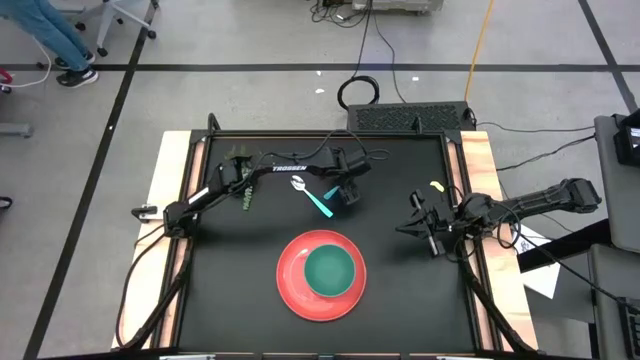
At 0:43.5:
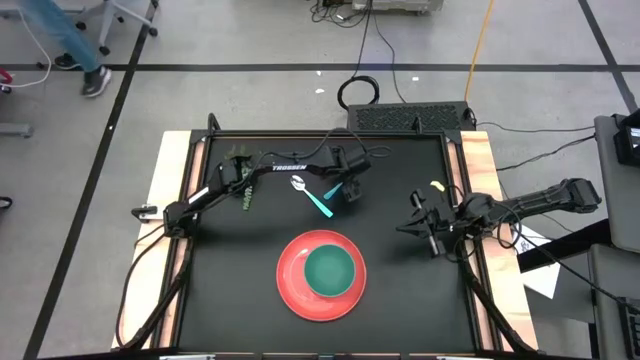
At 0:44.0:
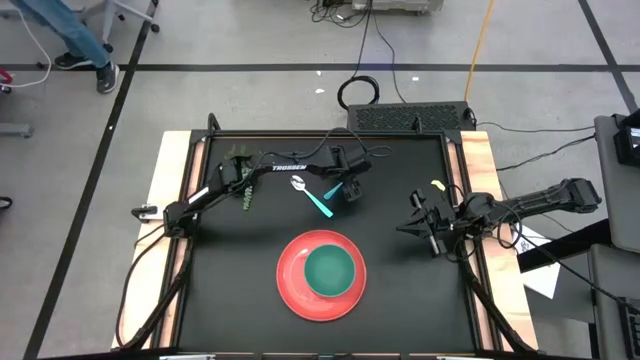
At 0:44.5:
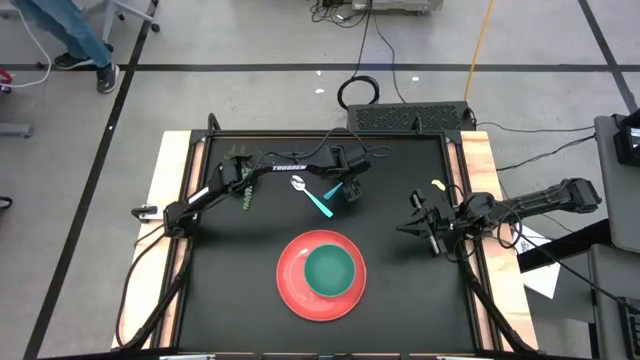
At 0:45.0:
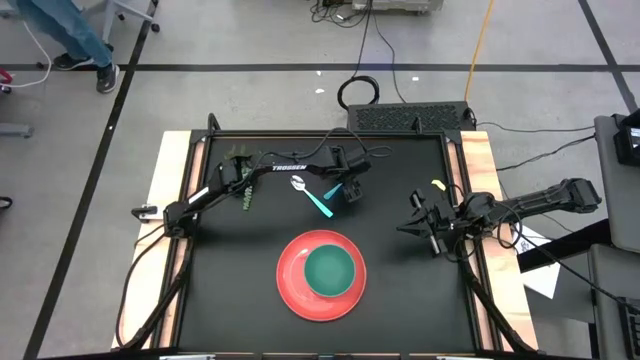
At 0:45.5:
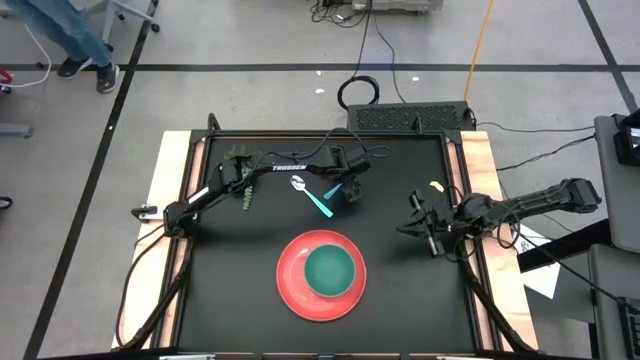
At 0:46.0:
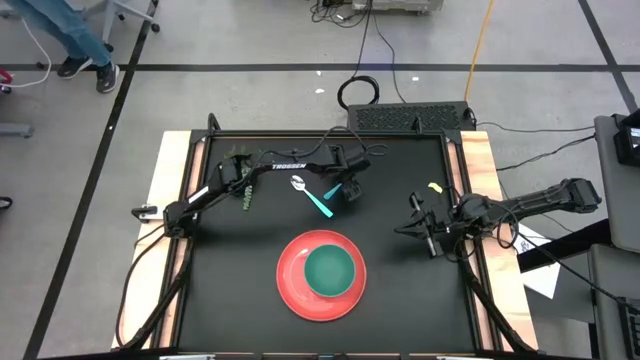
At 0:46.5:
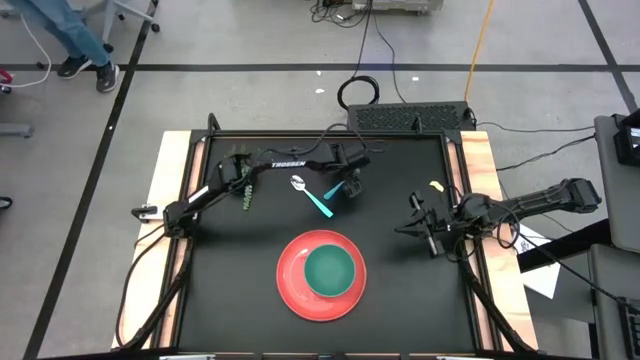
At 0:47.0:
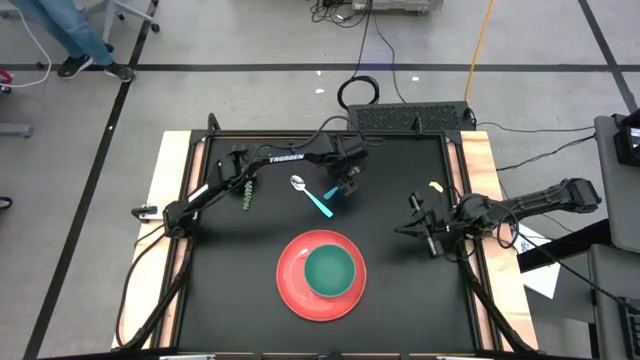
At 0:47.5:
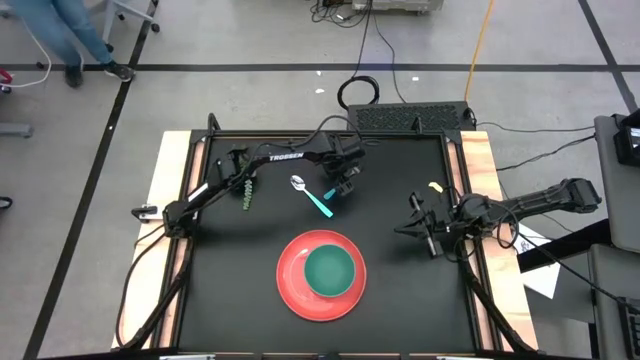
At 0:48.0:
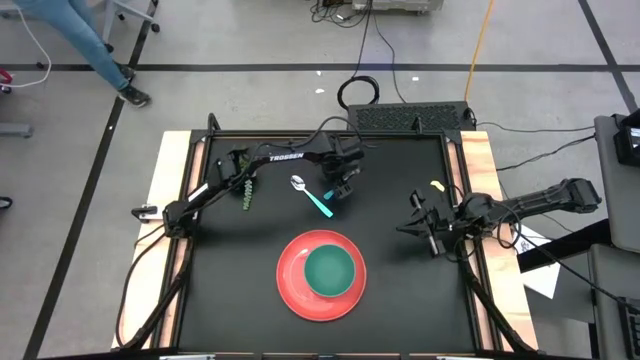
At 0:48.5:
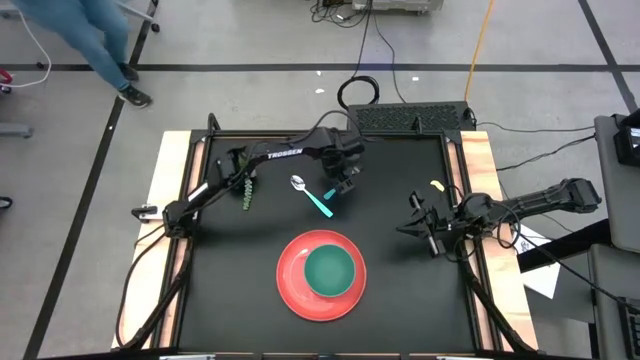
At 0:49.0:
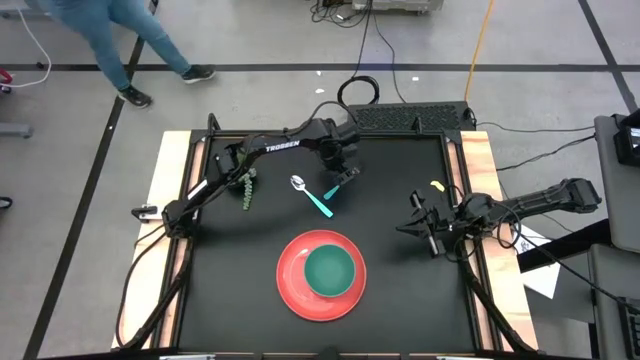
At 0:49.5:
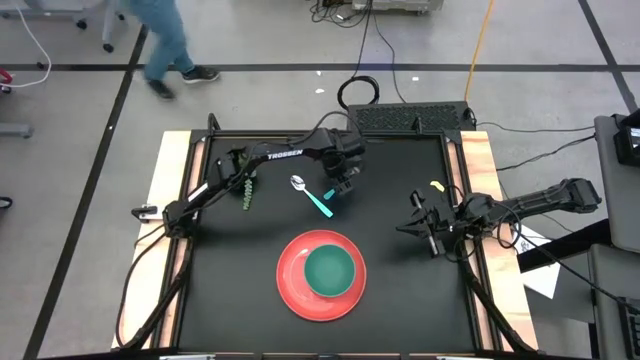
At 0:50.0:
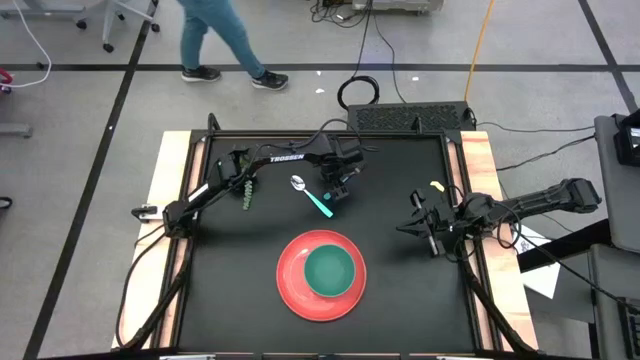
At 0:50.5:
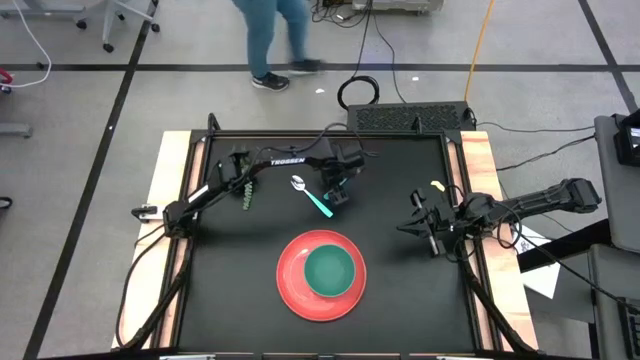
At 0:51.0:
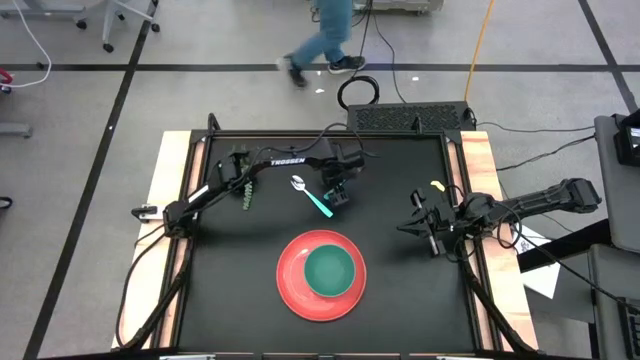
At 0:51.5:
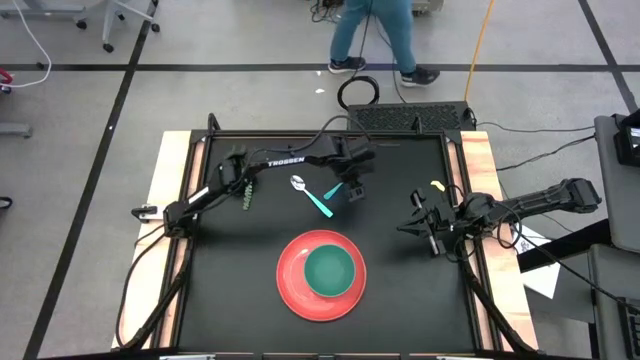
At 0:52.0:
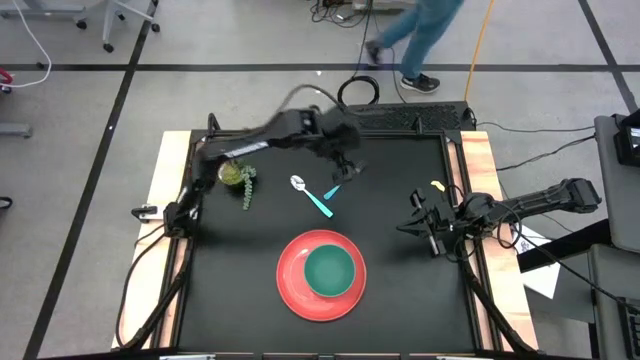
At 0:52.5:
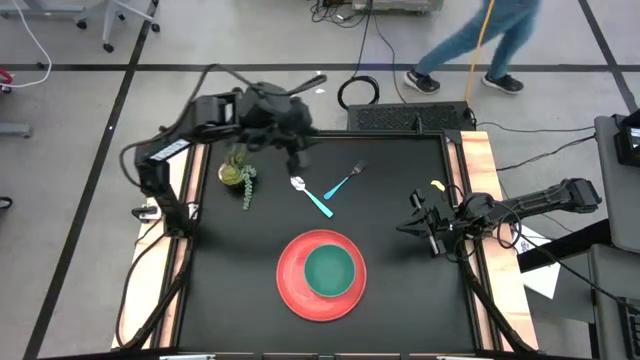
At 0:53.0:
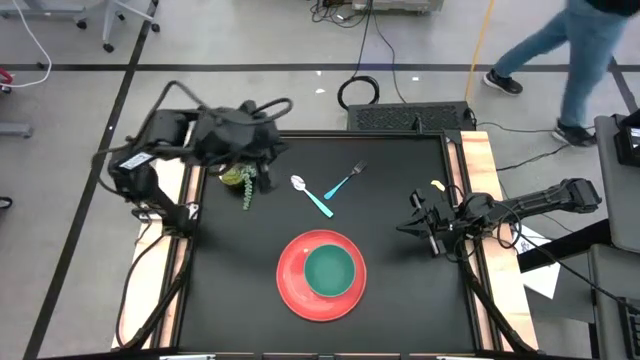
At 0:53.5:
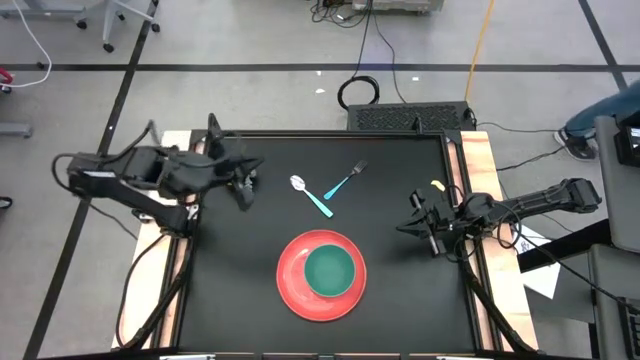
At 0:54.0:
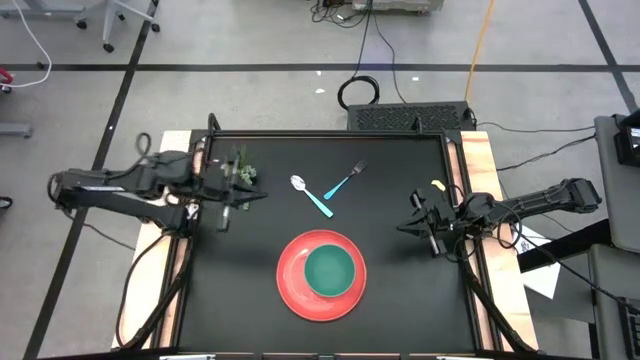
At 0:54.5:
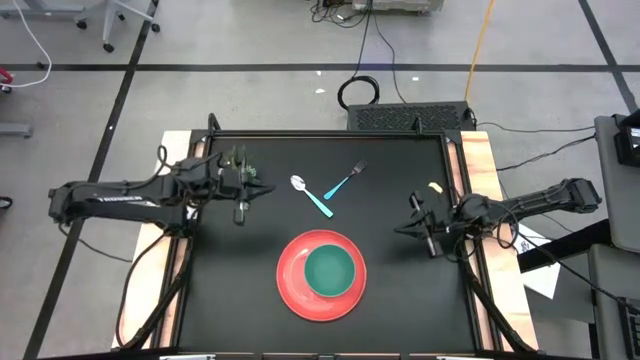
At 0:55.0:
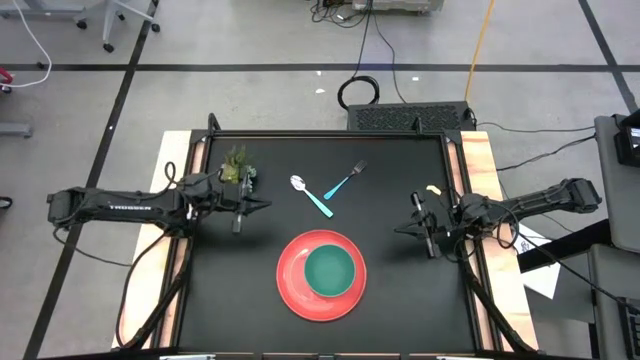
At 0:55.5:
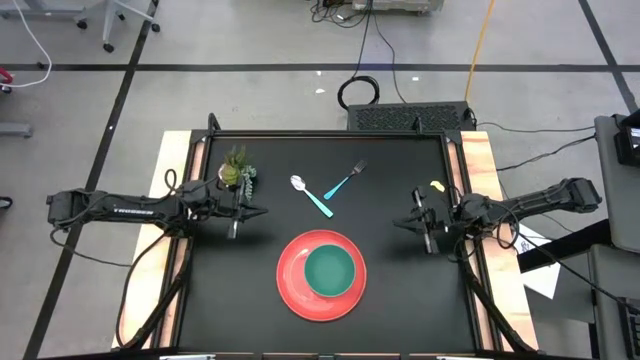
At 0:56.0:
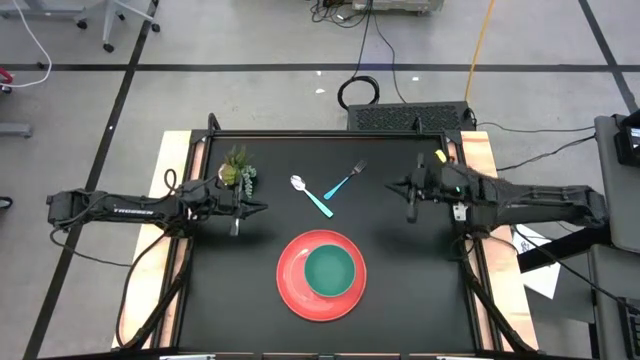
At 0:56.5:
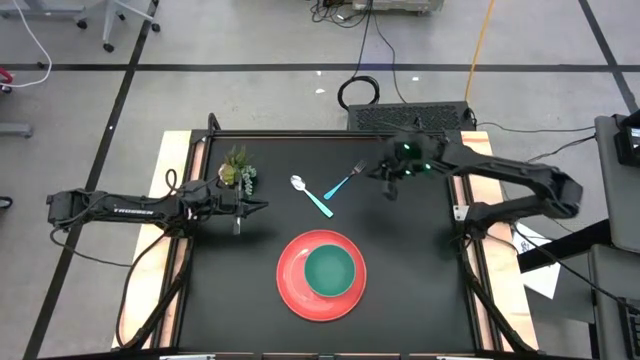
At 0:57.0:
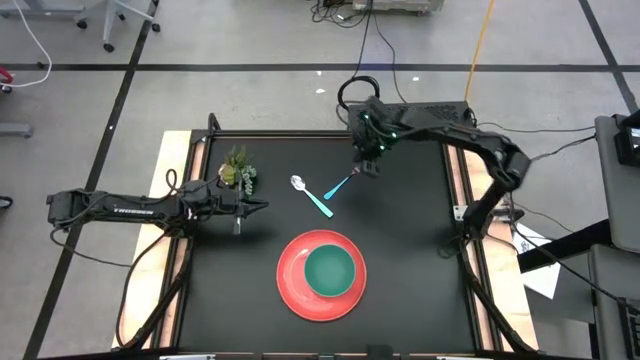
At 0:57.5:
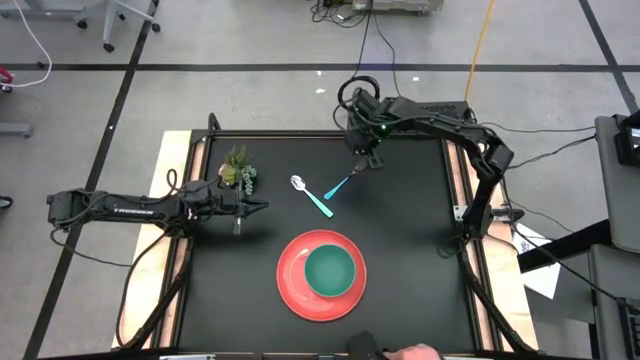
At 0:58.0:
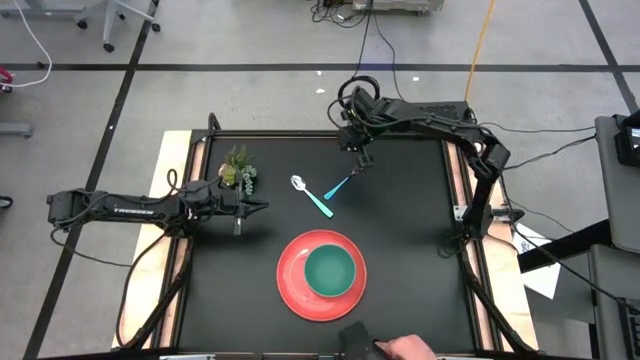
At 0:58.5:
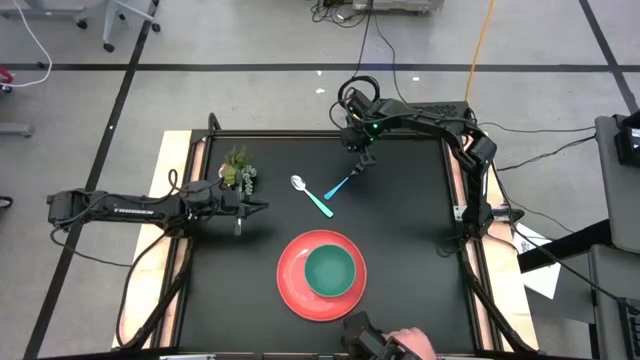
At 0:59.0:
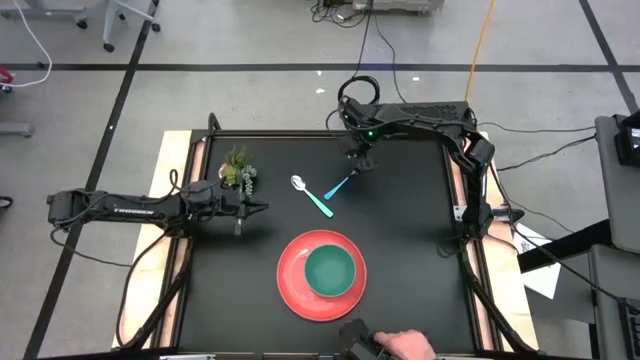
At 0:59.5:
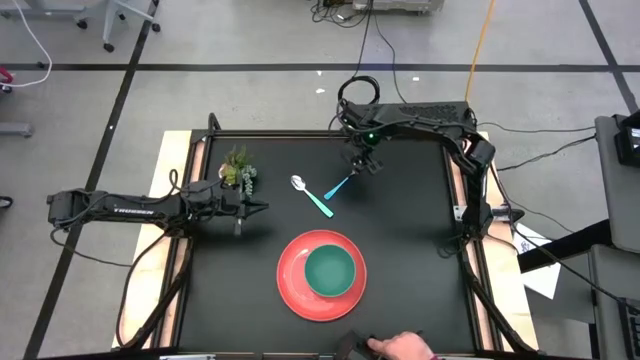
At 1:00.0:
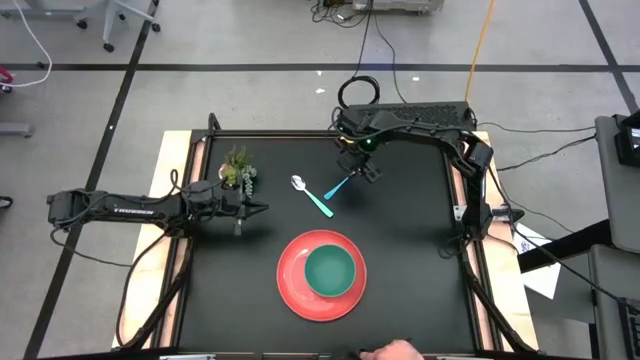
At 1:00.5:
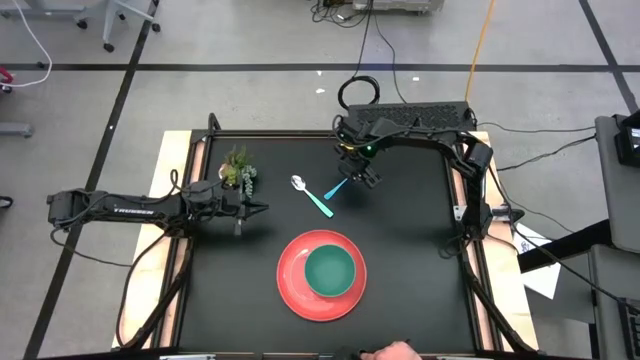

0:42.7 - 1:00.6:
Task: Set table place
Put the blue fork on the orange plate to the left of the green bowl

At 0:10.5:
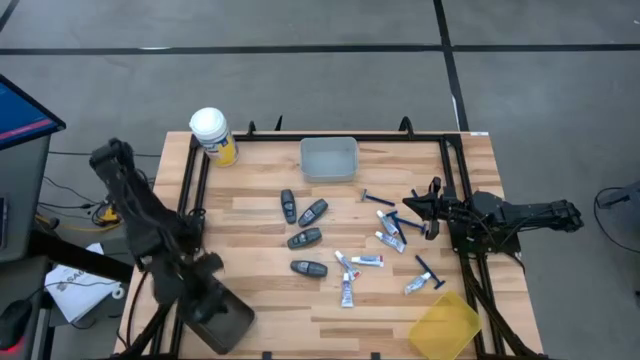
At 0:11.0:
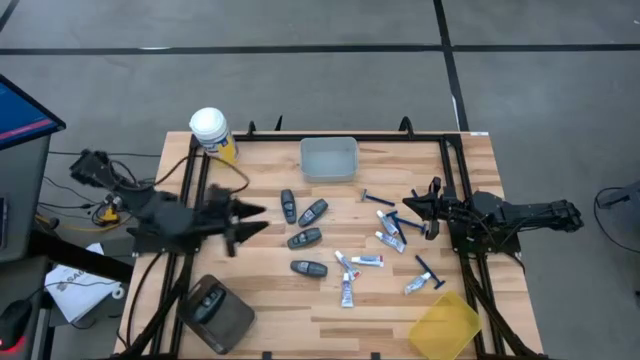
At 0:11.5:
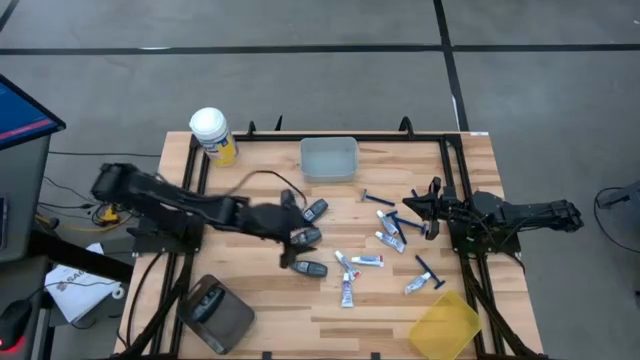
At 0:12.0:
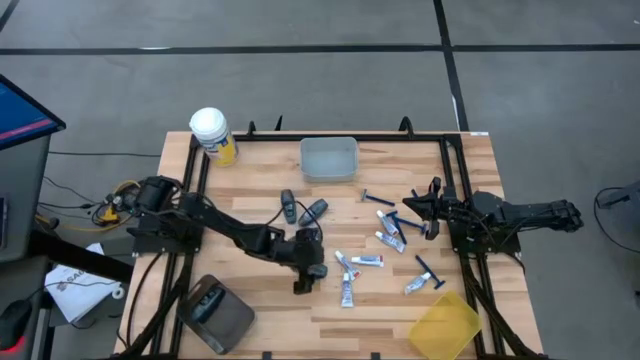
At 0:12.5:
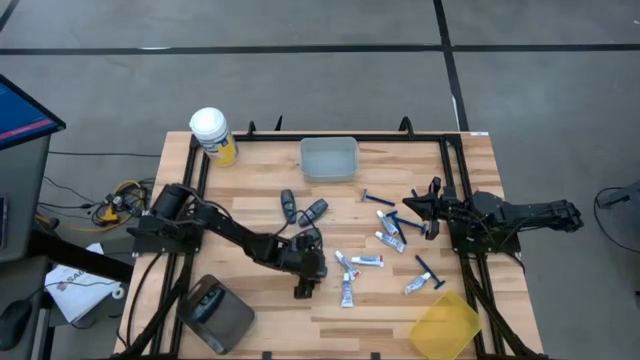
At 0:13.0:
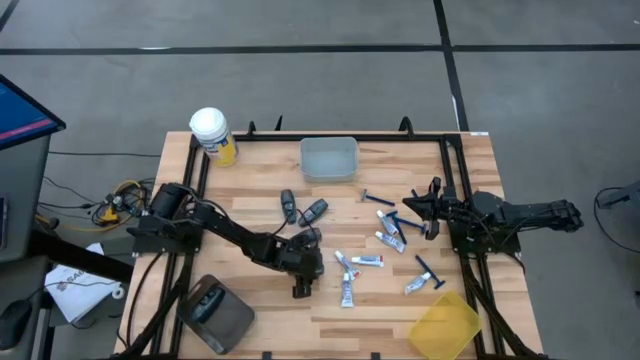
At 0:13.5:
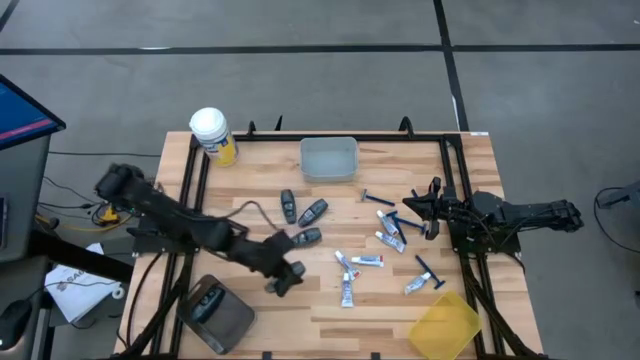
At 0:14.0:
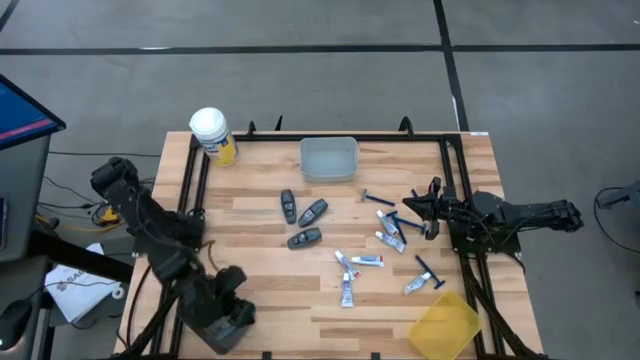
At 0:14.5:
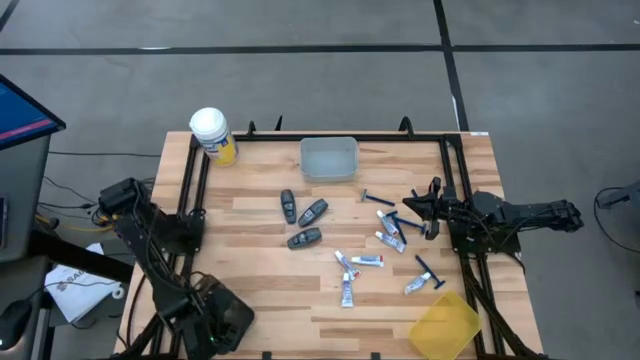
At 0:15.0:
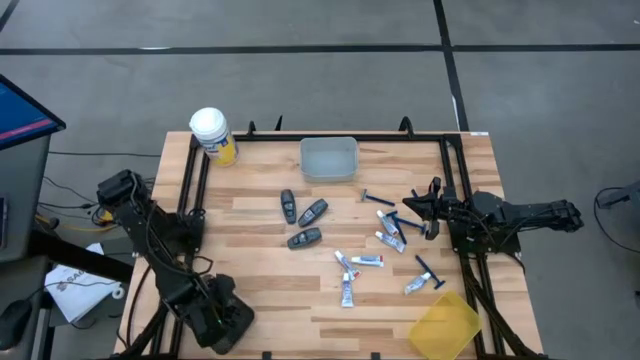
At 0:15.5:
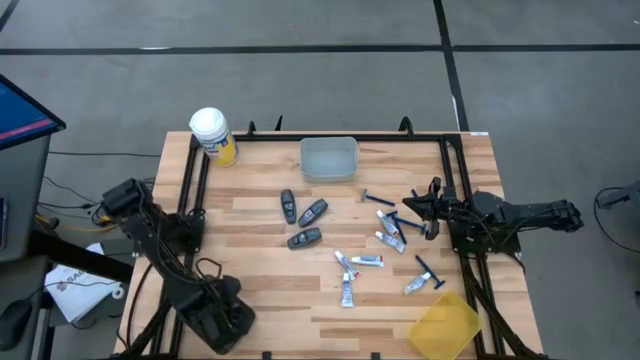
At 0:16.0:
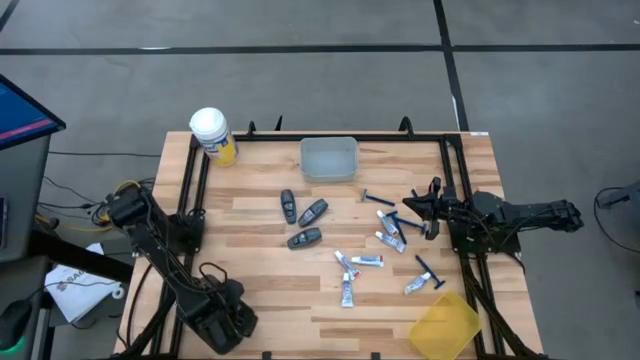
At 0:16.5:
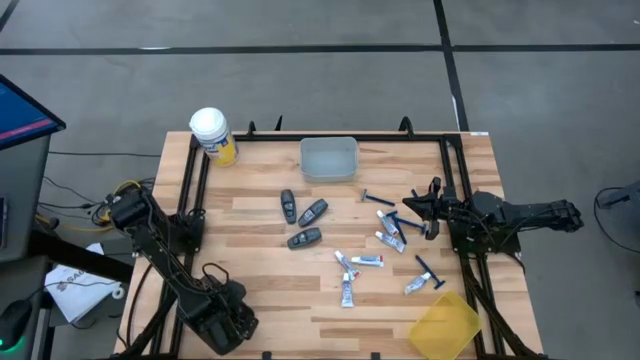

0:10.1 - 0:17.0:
Task: Pick & Place Travel size toiletries
Put the black deodorant into the black bin
